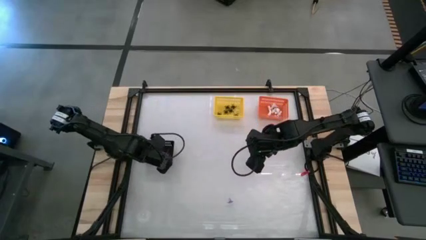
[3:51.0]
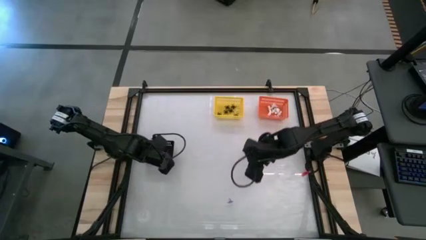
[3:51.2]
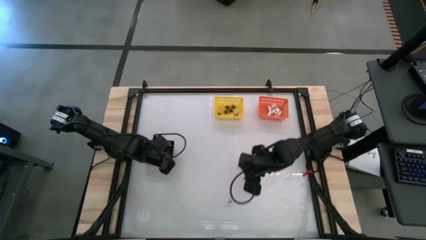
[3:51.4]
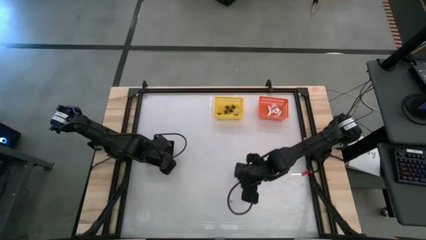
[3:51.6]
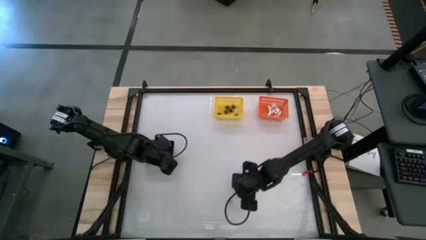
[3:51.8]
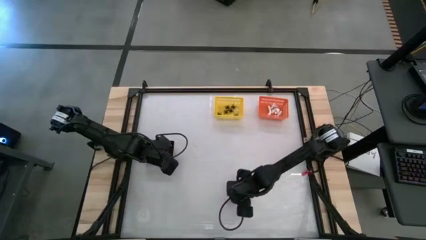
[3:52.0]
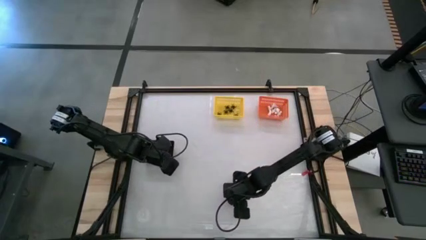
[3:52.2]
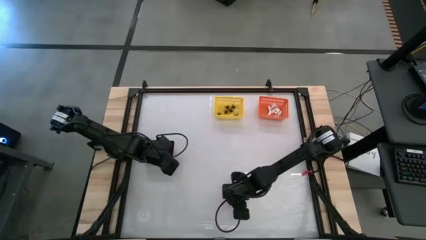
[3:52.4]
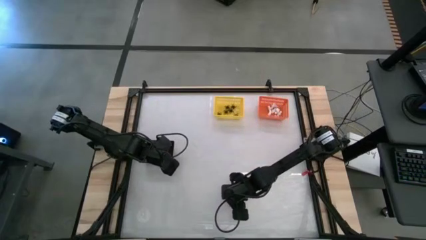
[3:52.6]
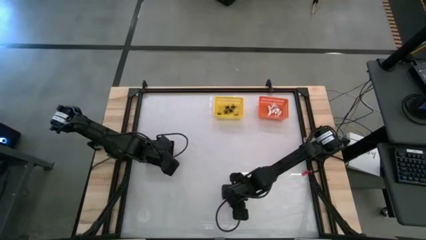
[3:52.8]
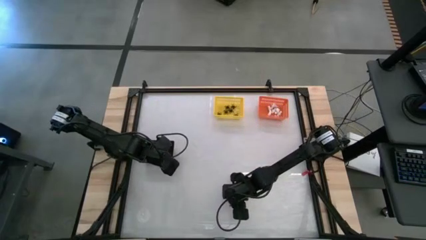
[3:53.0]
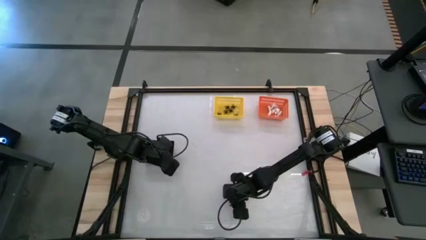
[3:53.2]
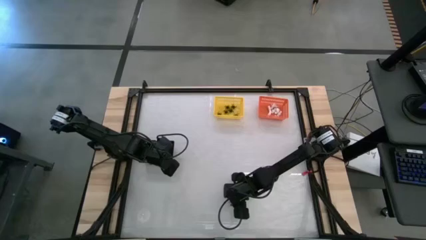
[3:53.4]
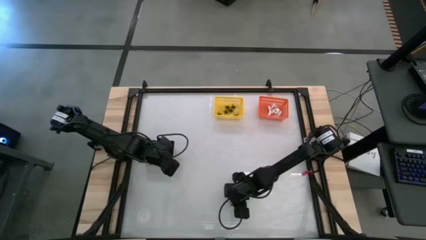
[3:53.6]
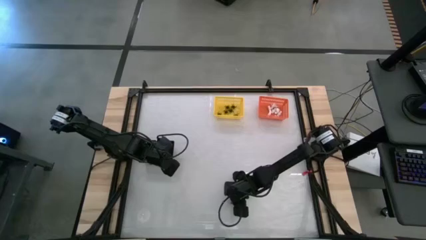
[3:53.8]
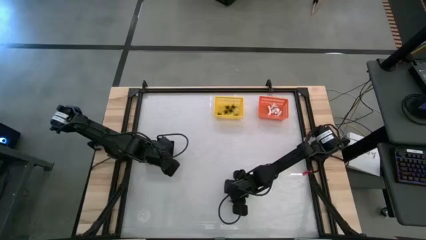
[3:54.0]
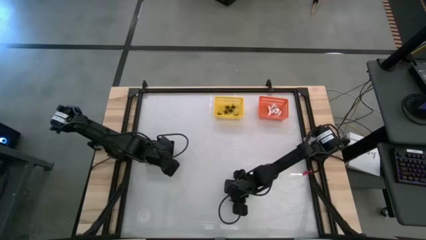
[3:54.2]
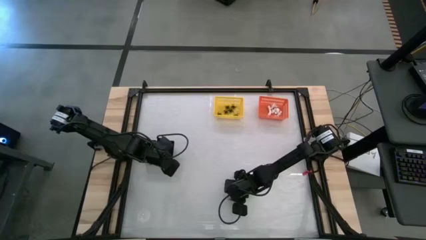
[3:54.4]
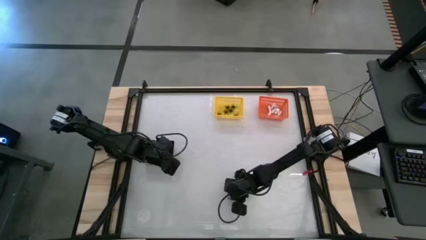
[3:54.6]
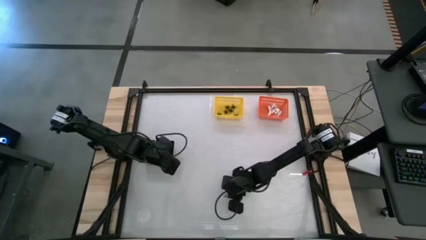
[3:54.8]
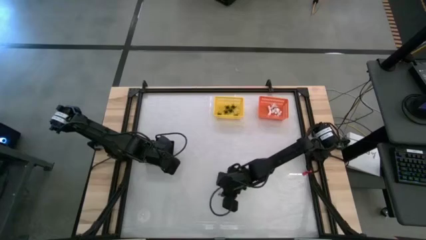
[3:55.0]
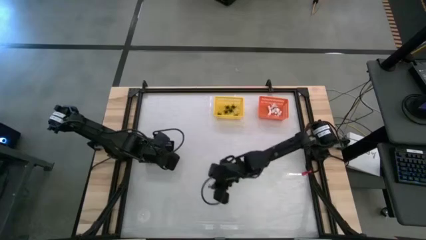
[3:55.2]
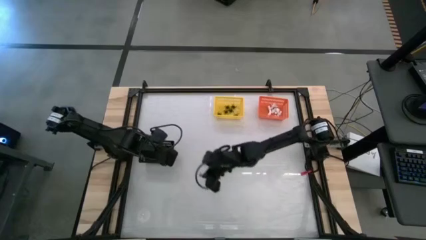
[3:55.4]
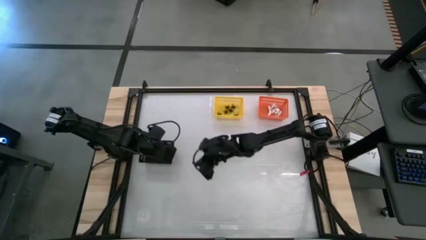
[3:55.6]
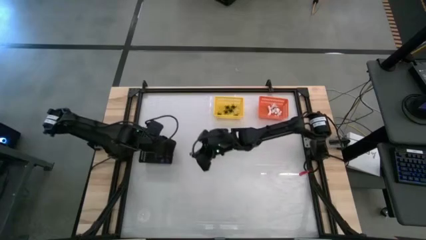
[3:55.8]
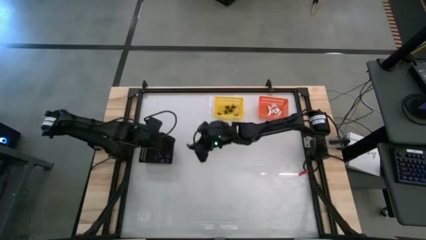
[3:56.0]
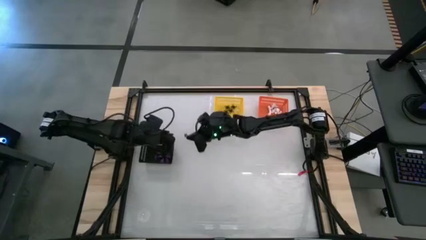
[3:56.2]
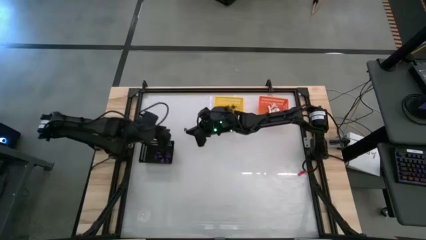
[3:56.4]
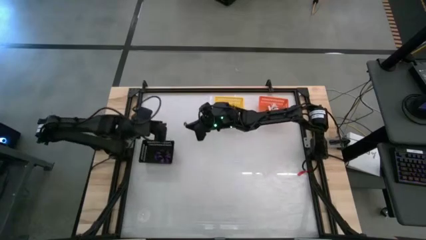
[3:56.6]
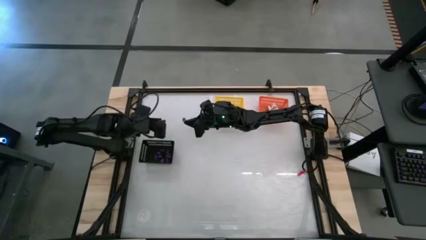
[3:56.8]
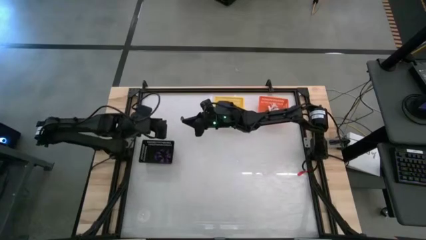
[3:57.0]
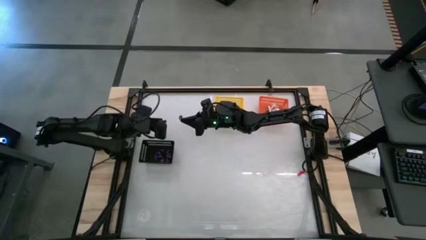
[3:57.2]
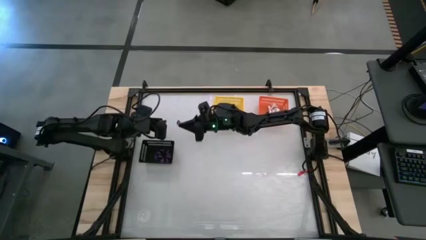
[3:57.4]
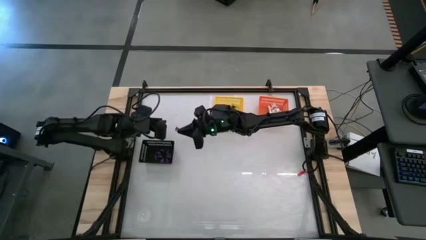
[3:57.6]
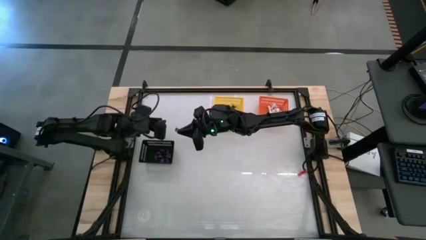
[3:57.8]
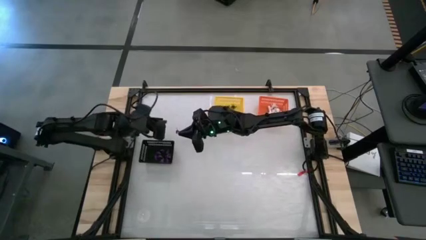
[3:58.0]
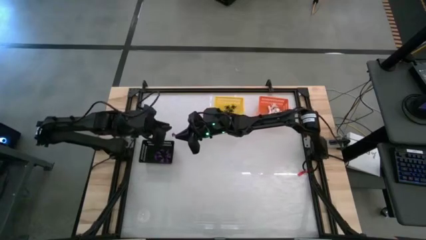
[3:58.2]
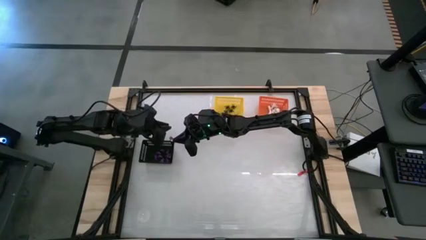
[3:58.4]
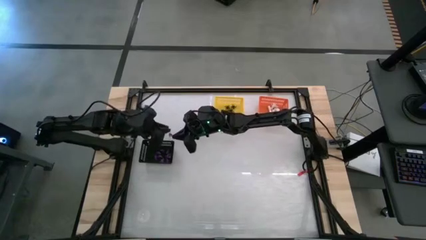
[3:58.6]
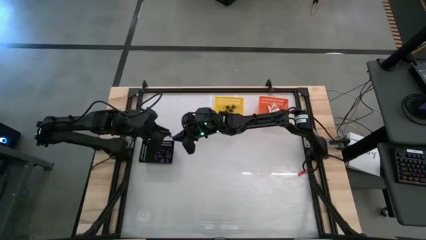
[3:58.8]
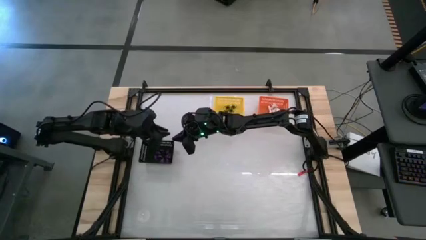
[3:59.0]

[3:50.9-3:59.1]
Task: Sort Halloween decoration
Put the purple witch hat toy into the black bin

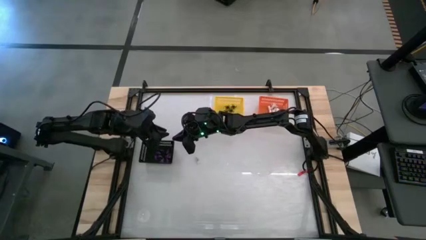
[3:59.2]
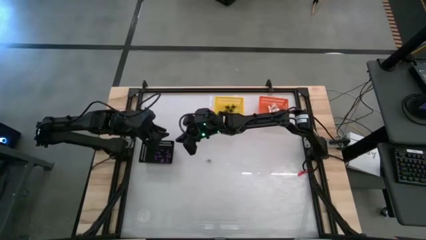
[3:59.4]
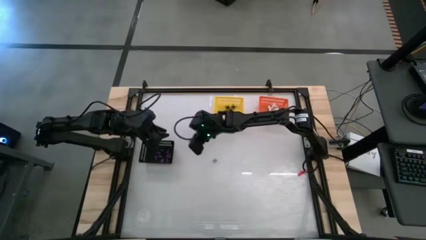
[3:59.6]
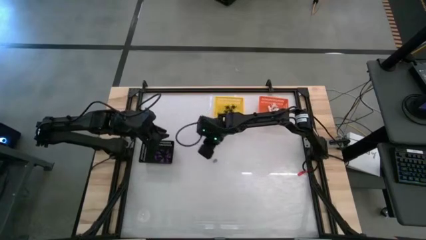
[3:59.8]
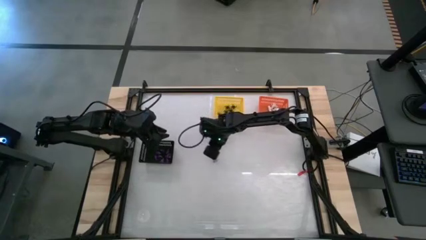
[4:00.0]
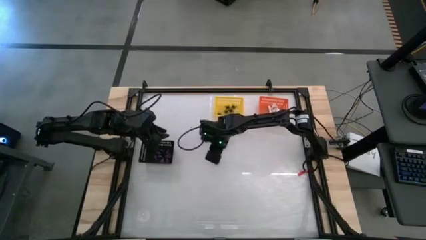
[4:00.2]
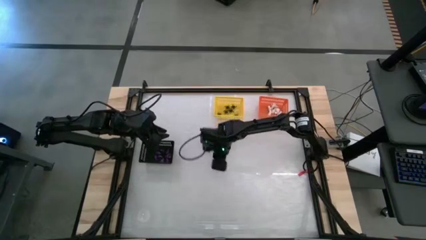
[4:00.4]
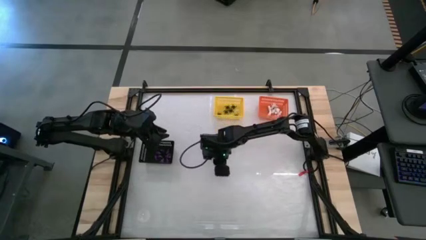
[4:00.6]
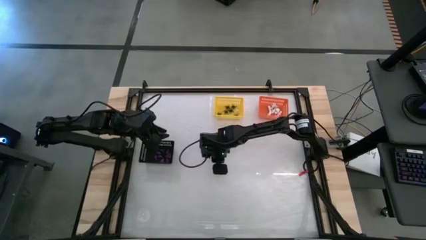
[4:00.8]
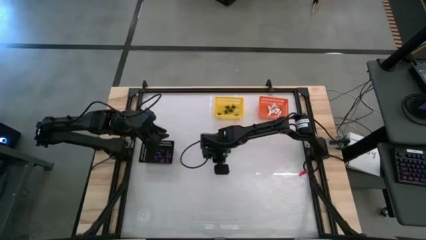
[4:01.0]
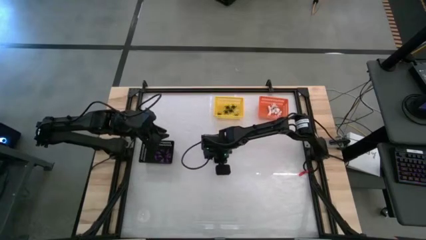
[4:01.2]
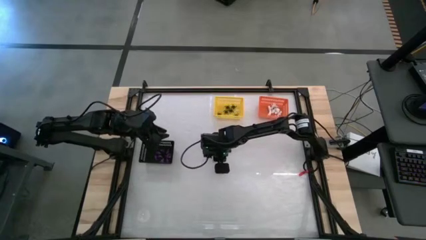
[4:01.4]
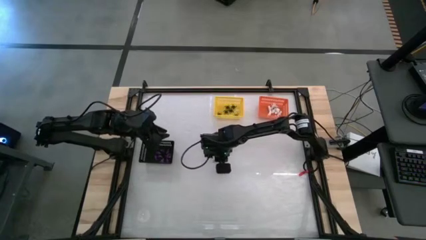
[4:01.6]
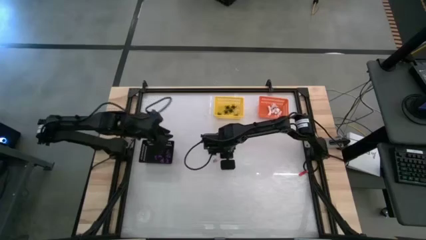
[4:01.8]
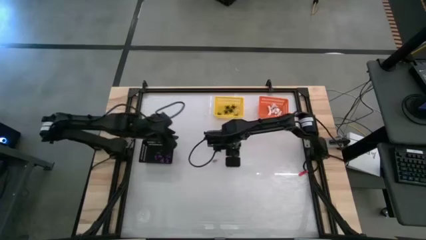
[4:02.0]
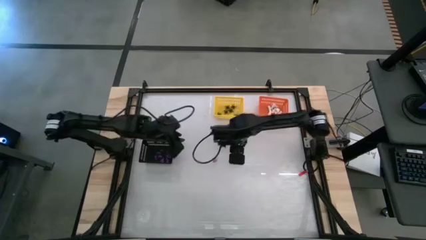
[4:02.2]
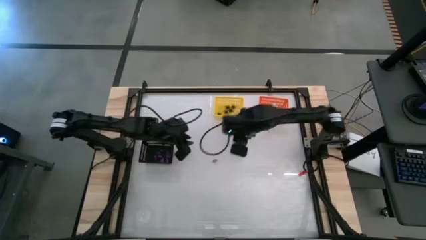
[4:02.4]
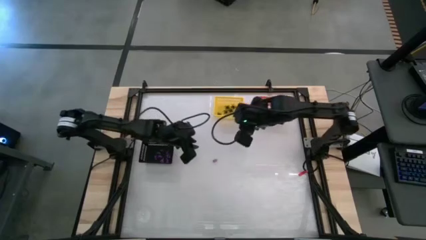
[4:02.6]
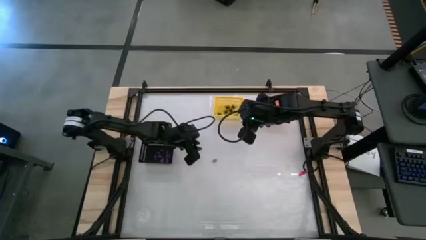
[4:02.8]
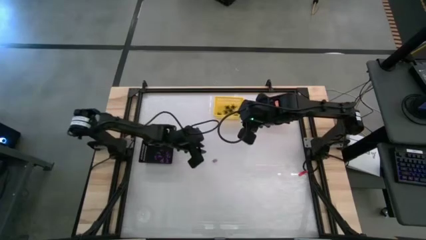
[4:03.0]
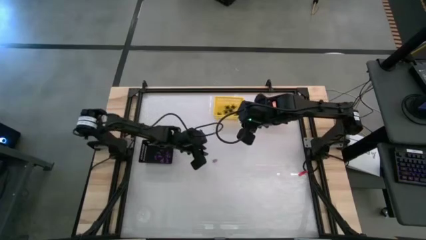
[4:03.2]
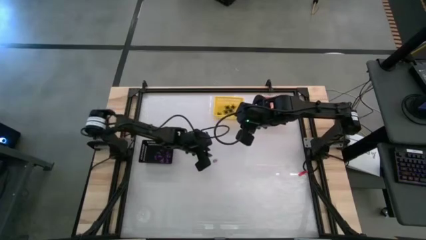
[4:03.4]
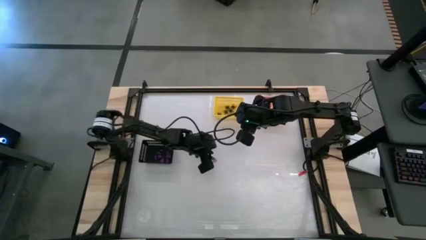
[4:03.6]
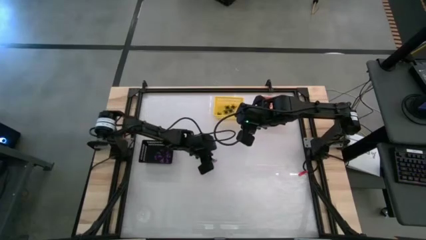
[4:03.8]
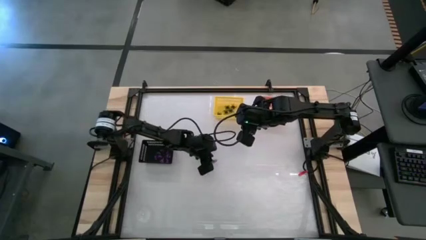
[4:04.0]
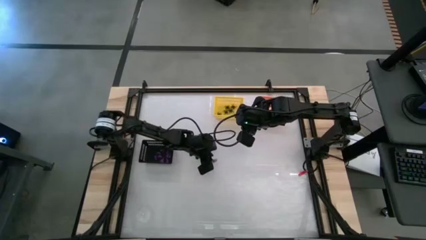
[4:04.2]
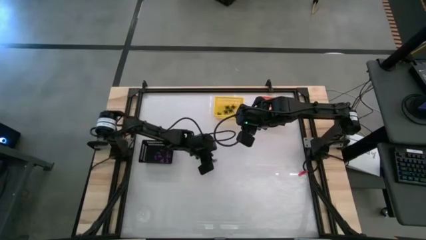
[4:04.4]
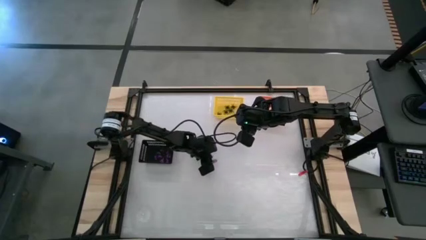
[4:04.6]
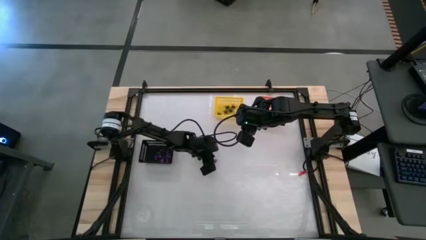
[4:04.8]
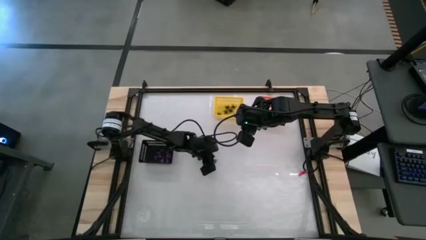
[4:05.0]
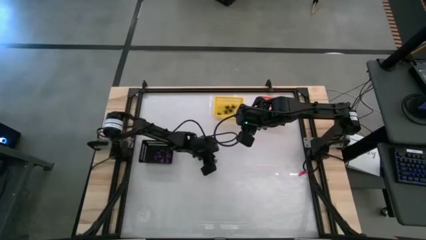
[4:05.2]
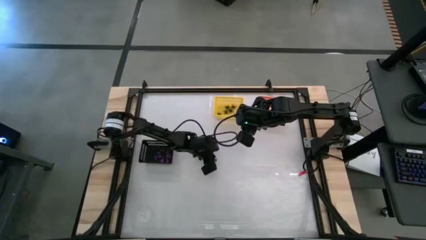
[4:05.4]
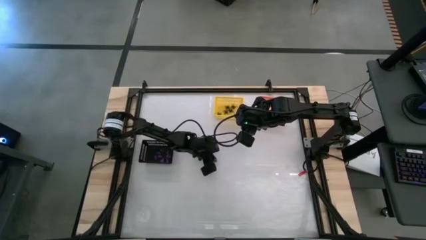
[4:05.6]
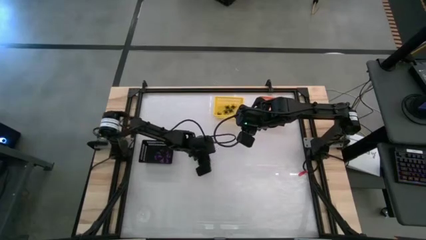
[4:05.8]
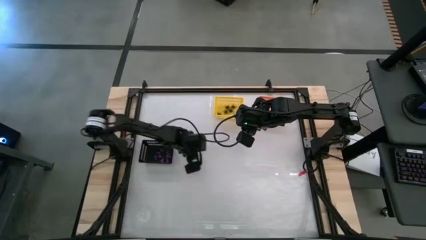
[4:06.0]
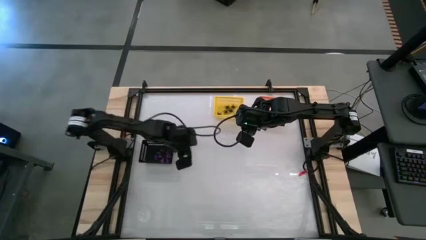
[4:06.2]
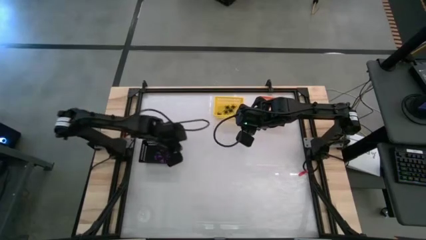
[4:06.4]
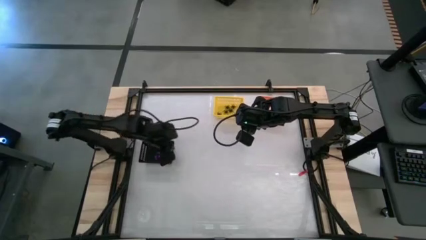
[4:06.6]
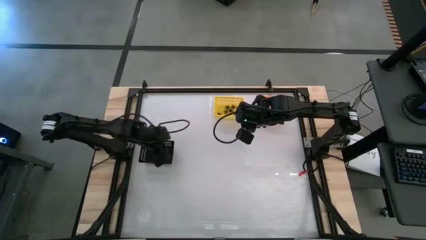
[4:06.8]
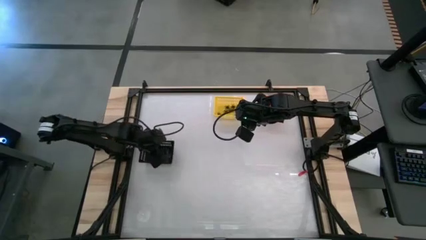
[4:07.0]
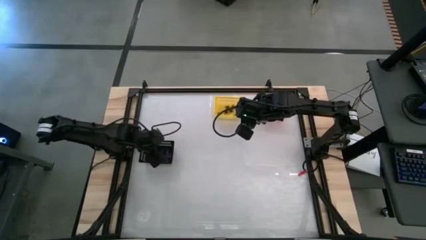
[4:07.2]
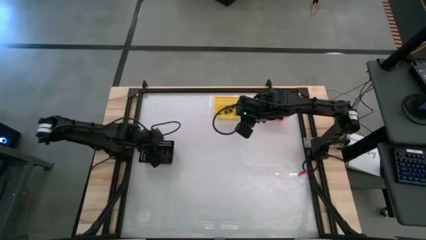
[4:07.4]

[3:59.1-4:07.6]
Put the purple witch hat toy into the black bin
